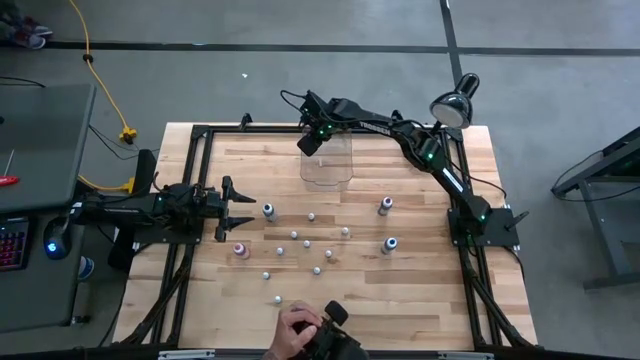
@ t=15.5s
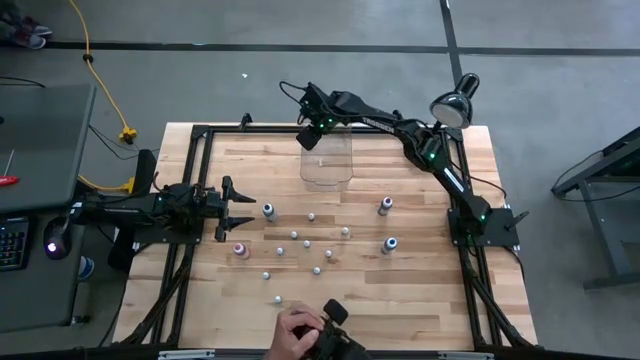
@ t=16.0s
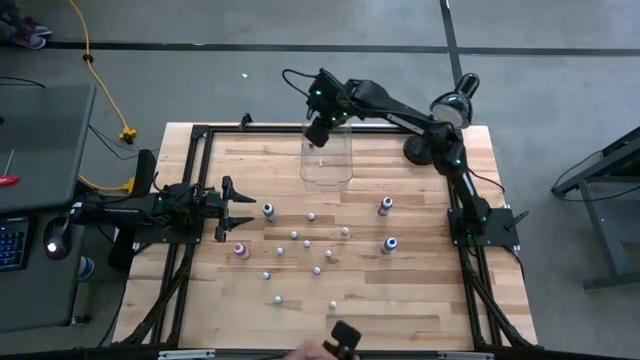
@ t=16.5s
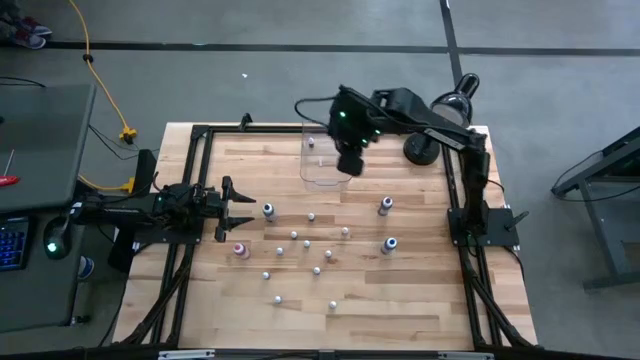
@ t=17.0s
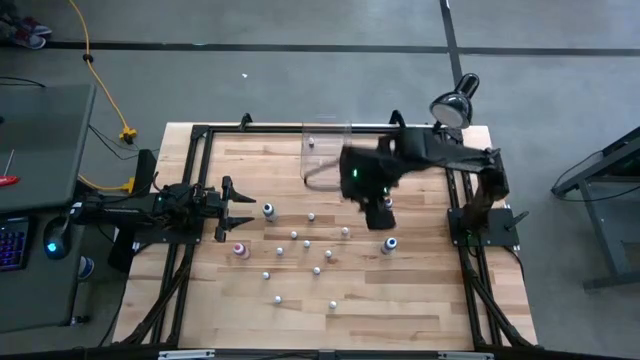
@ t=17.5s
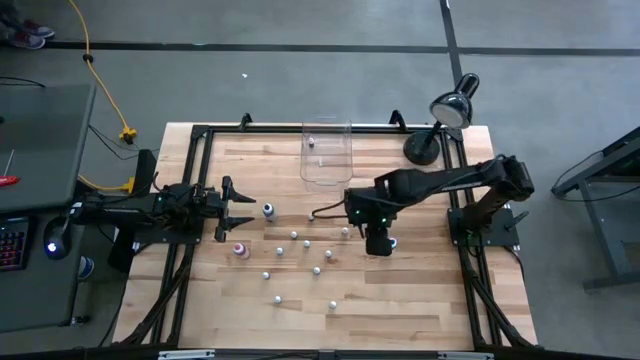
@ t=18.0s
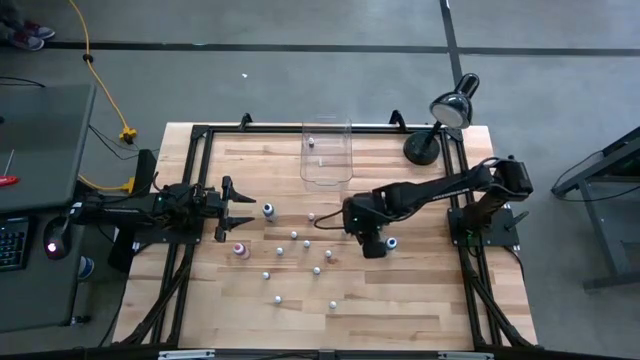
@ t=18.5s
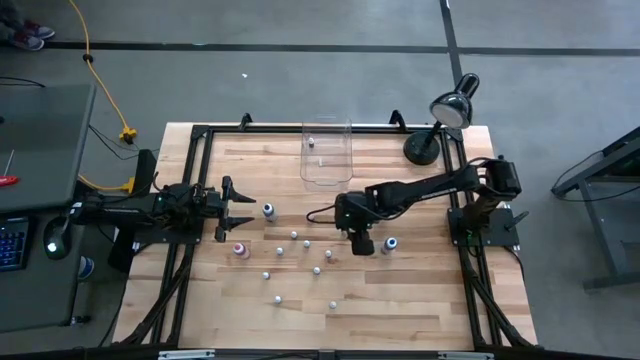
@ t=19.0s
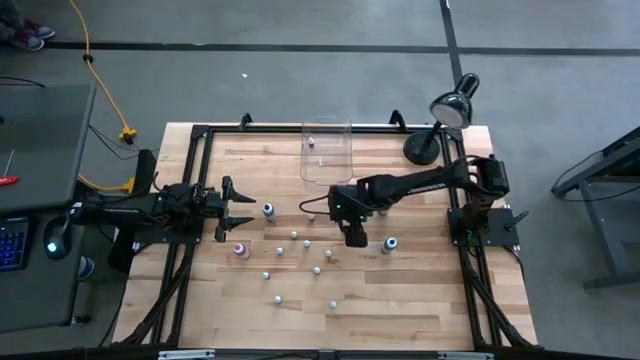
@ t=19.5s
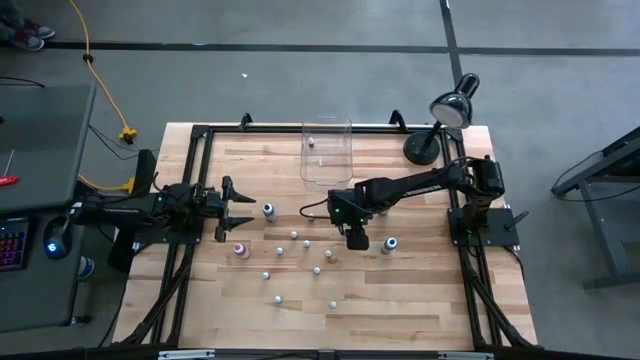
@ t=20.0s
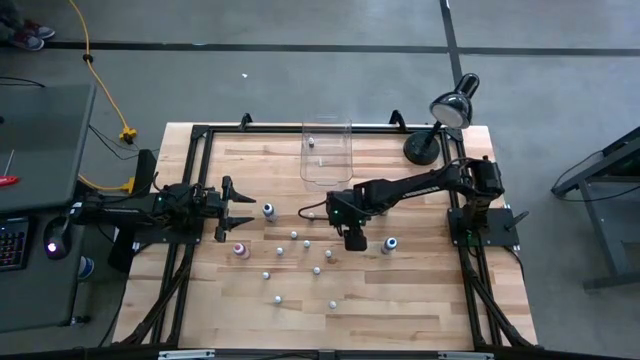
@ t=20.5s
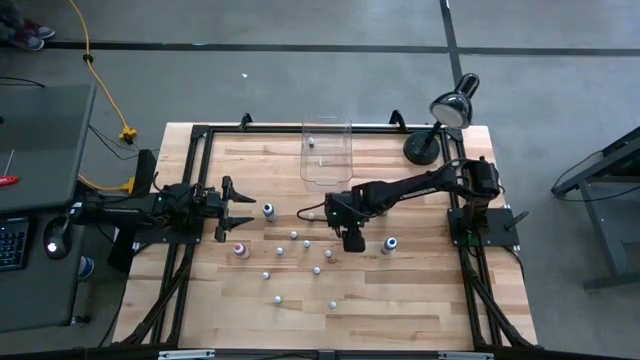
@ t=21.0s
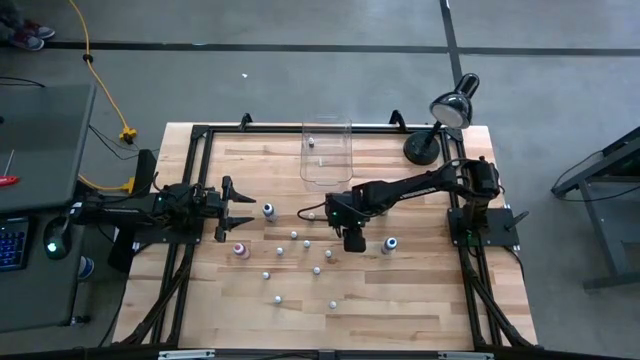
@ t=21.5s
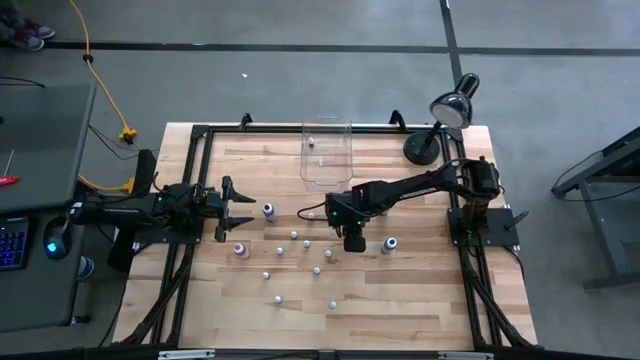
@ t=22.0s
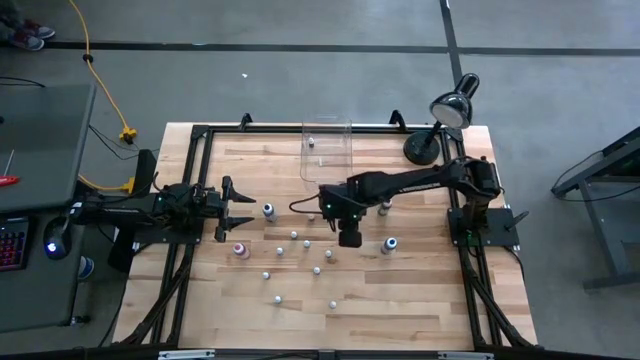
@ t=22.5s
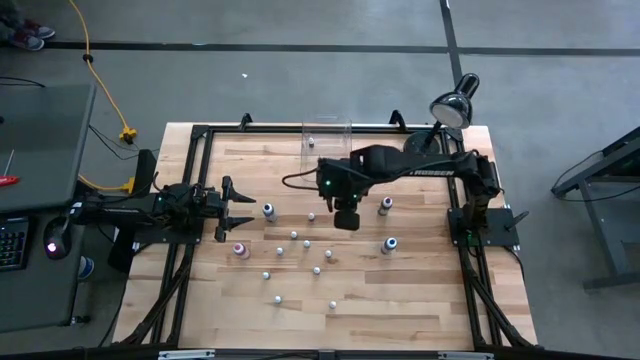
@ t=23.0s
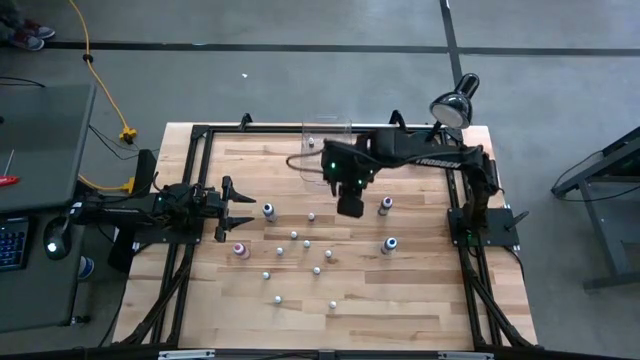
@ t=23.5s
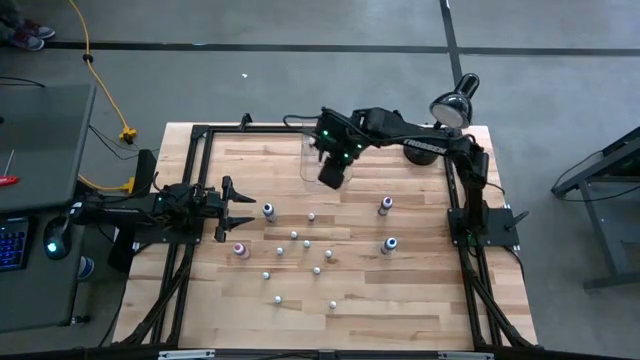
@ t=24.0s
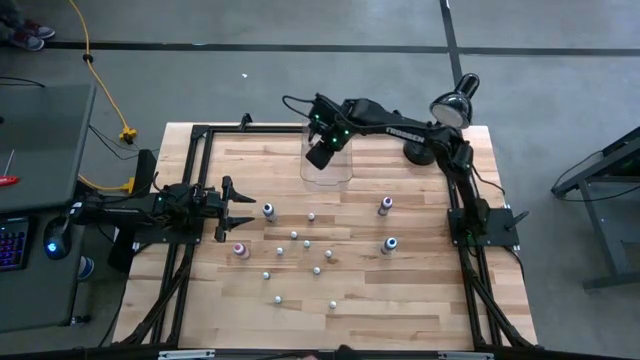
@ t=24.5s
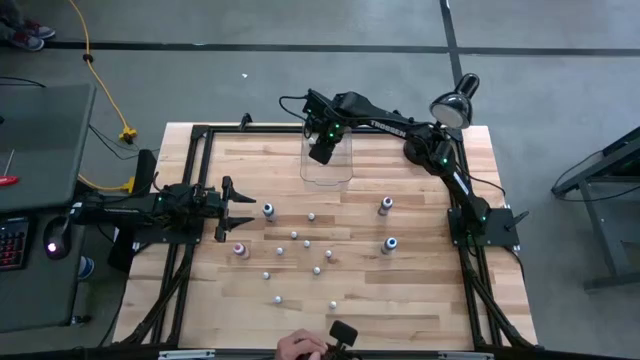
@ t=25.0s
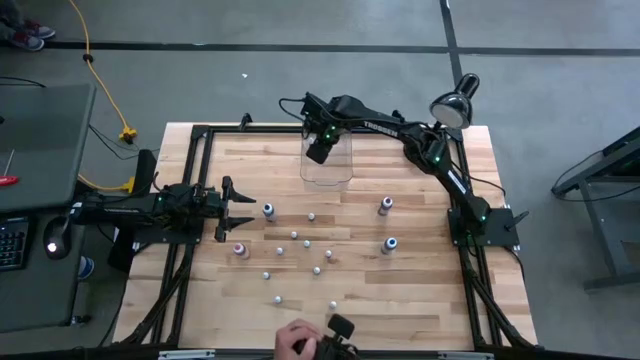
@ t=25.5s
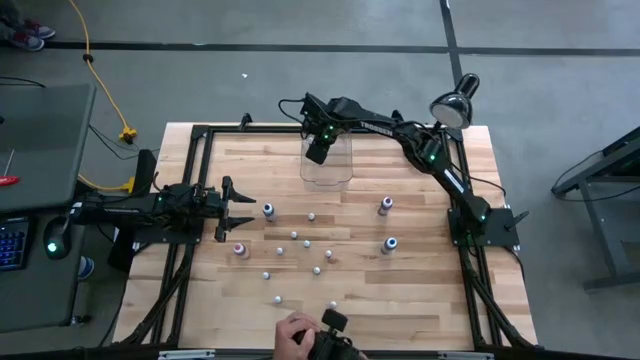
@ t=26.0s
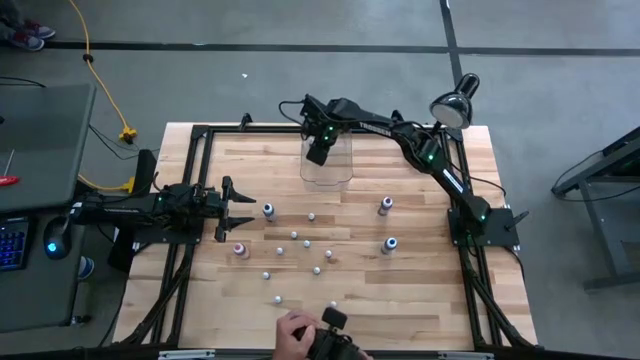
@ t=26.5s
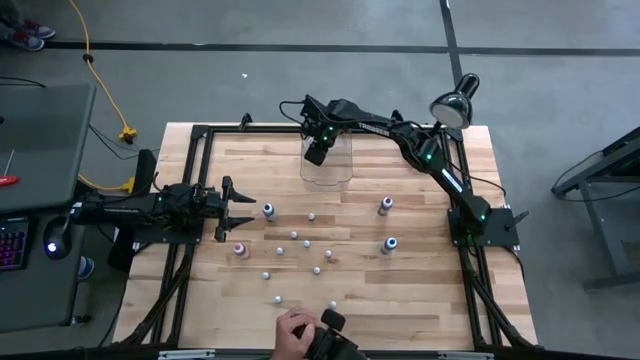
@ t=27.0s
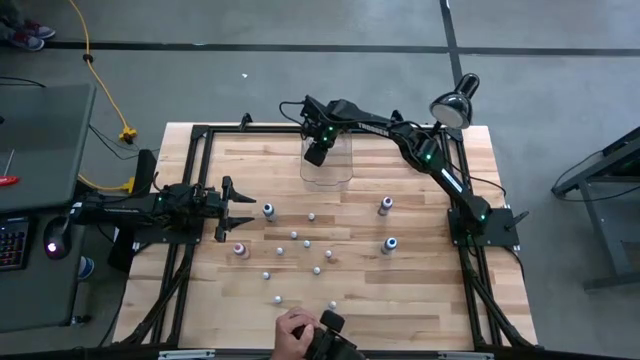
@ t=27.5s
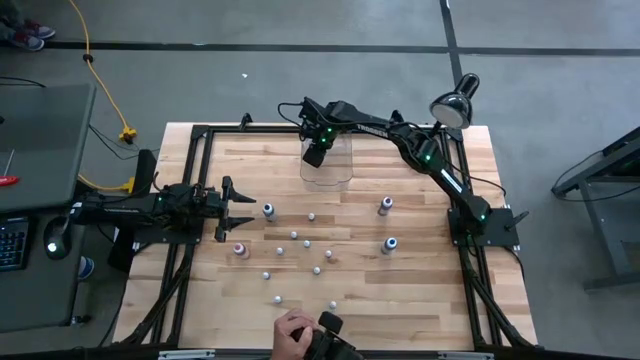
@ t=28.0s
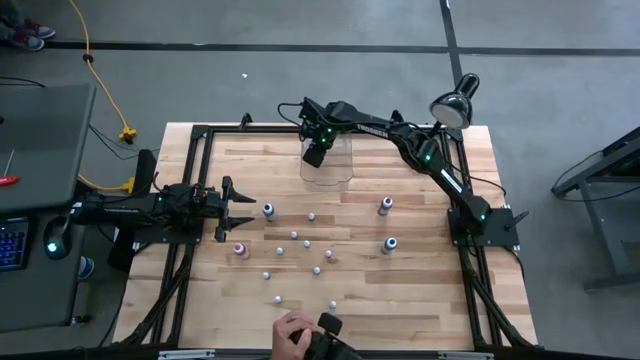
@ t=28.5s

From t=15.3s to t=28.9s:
Task: Pick & Place food coloring
Put the small food coloring bottle into the transparent bin

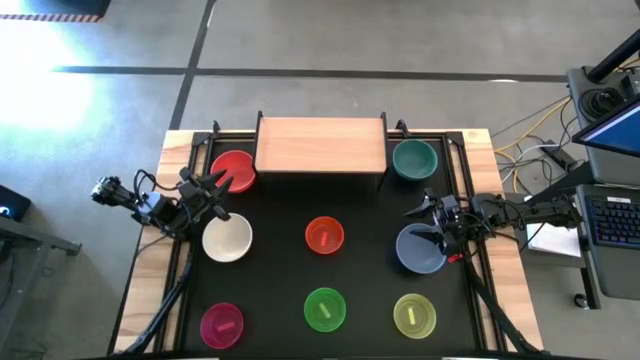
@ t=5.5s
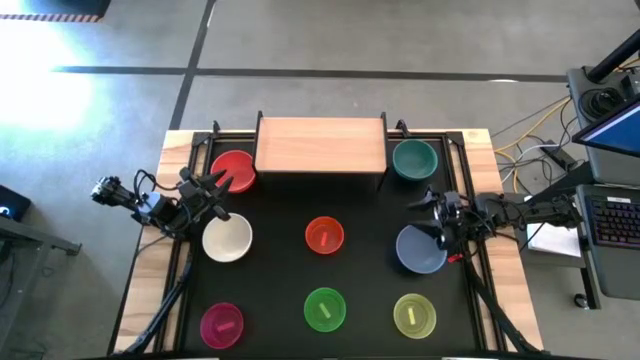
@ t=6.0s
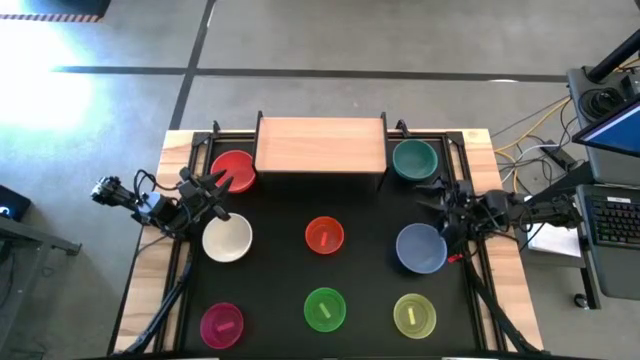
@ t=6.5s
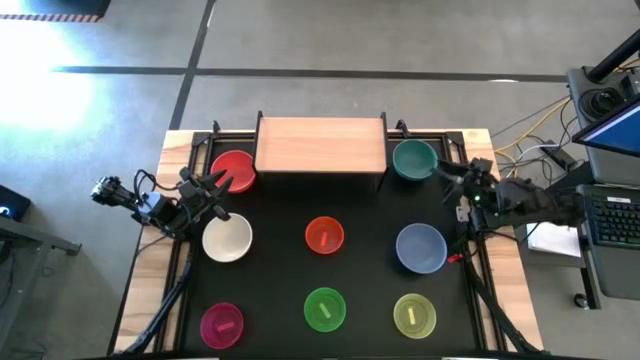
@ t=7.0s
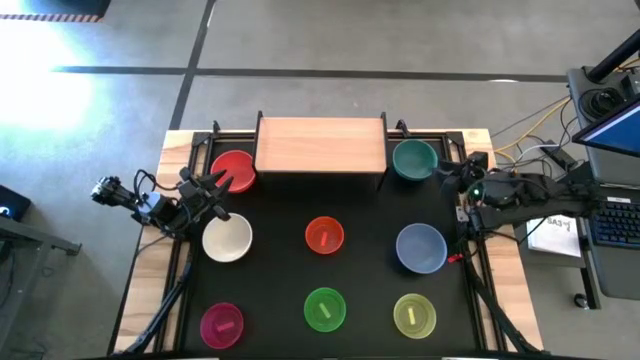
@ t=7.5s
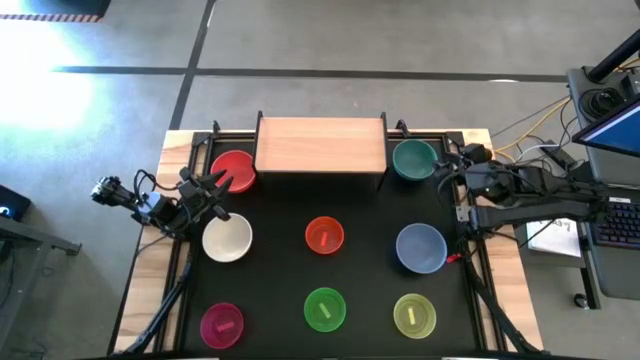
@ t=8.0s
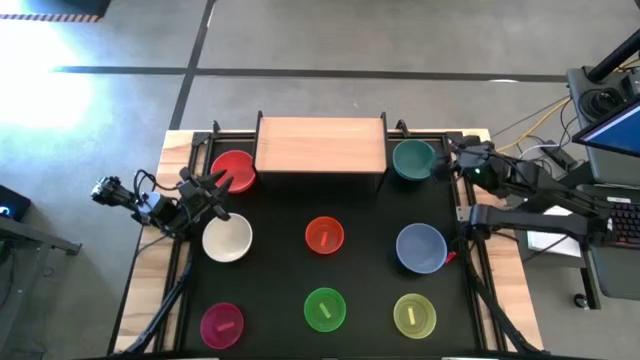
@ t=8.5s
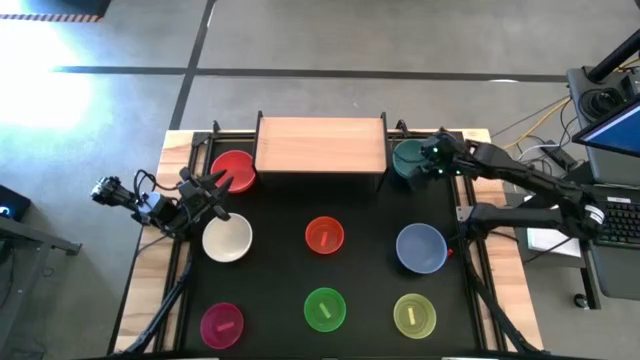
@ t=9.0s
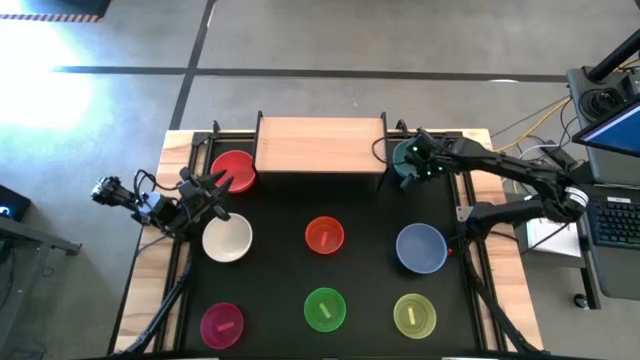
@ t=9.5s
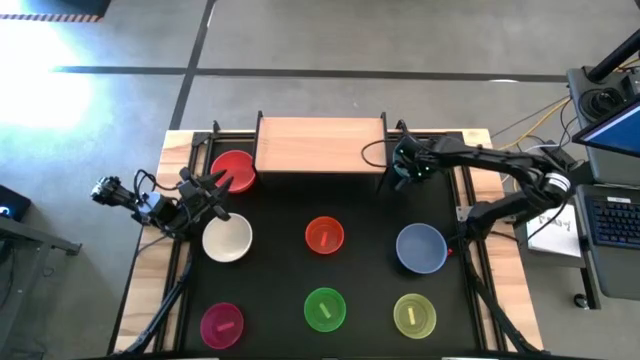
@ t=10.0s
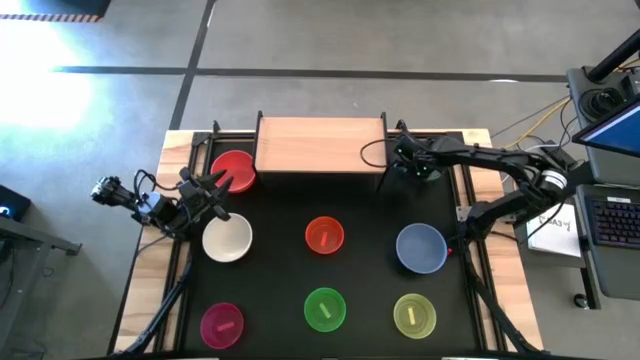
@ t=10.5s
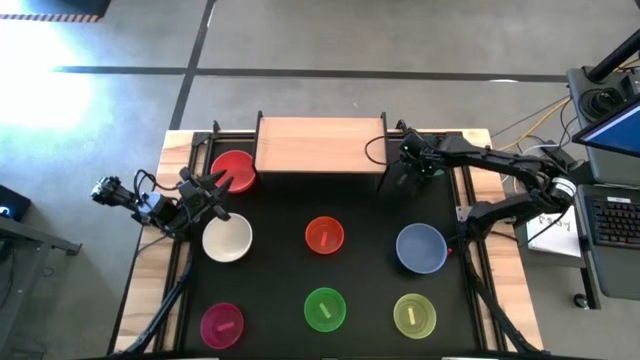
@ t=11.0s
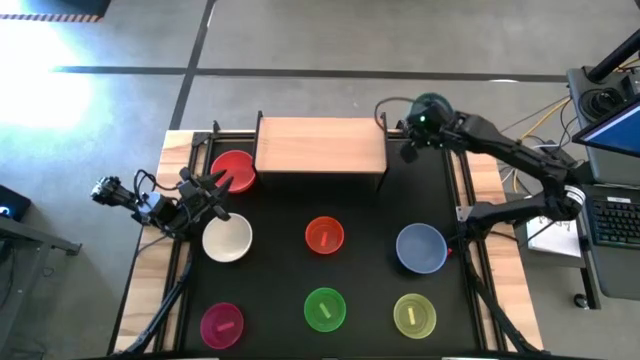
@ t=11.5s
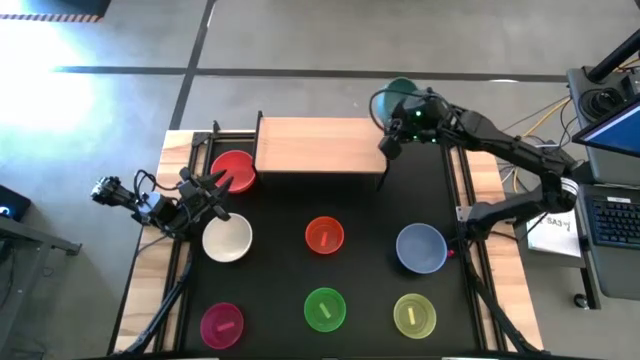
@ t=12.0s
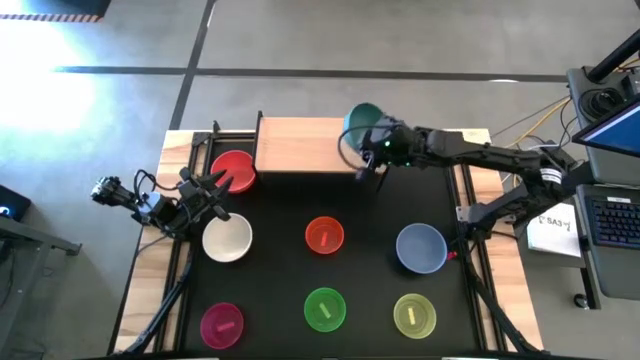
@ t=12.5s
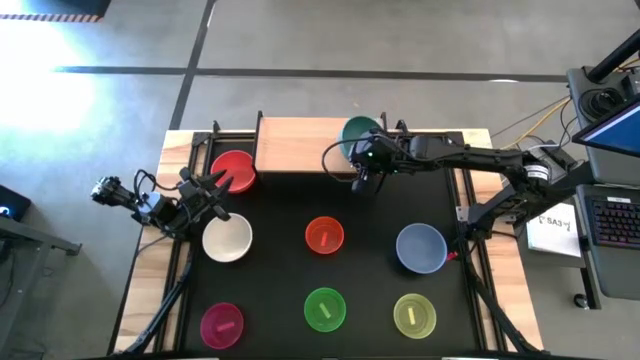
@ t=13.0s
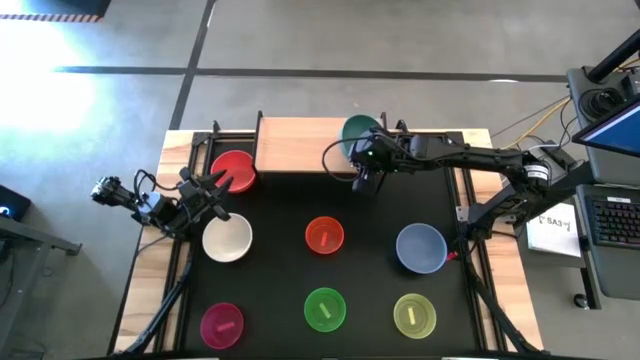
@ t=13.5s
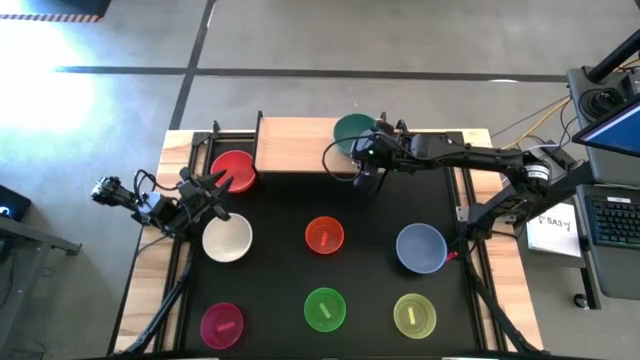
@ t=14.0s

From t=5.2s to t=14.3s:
Task: Place and stack bowls onto a shelf
Put the dark blue bowl on the shelf
